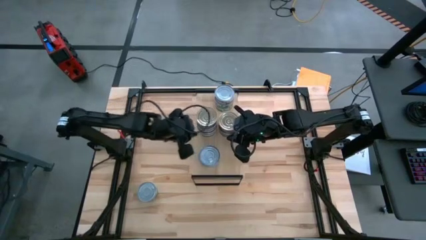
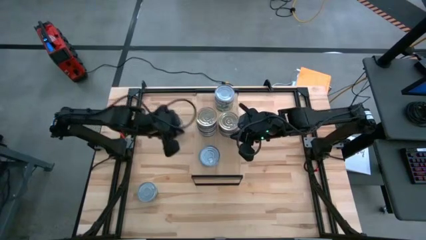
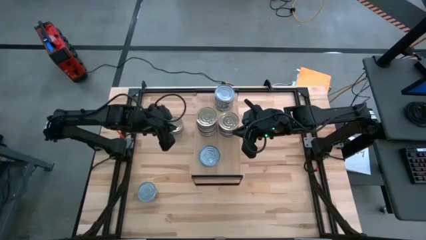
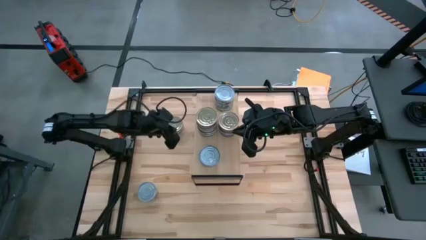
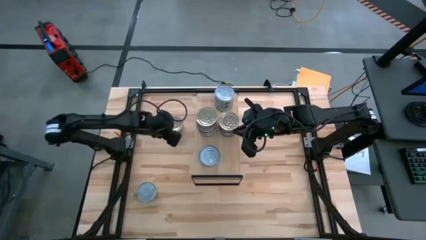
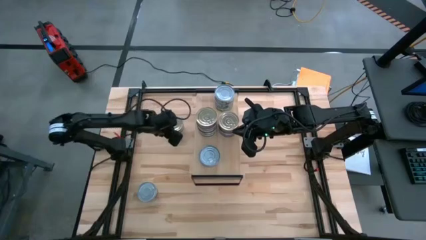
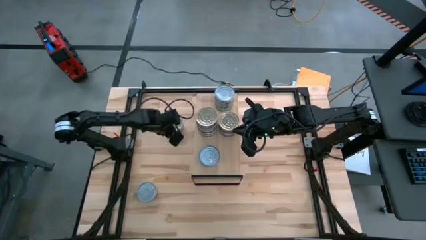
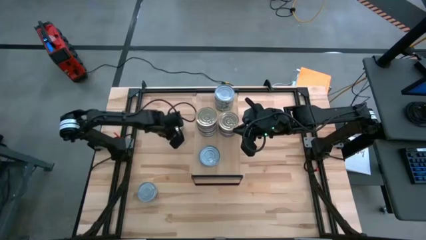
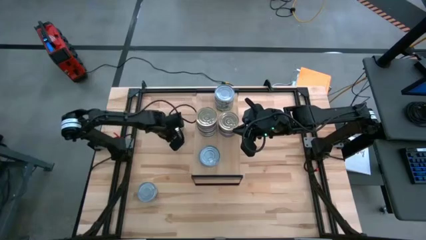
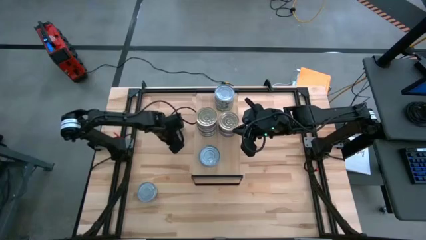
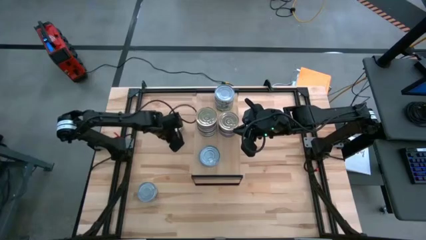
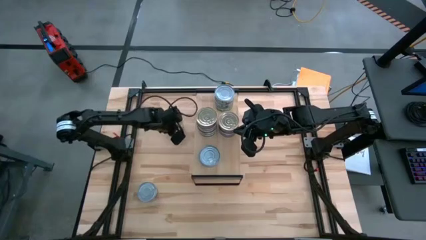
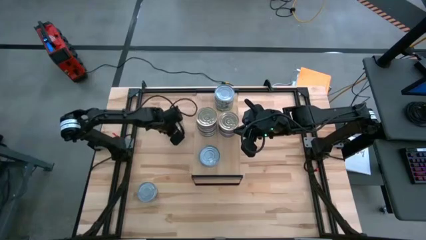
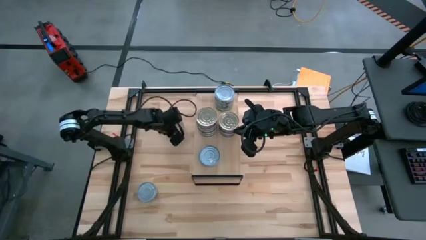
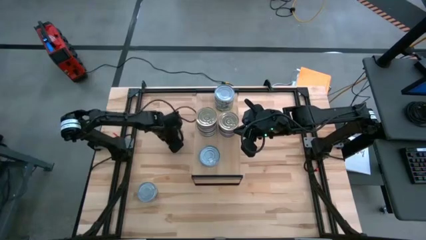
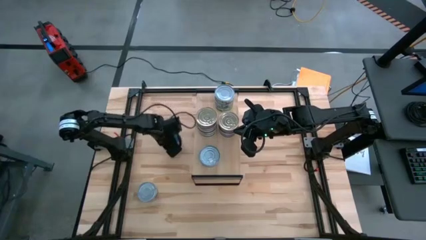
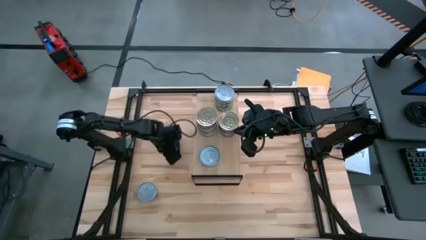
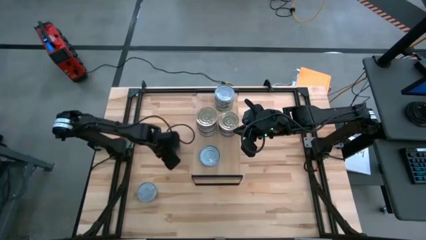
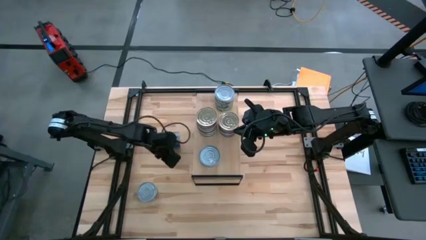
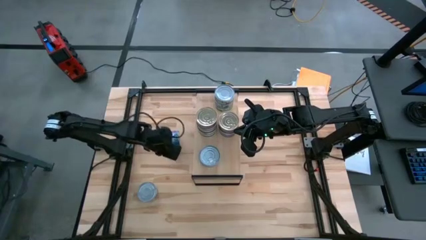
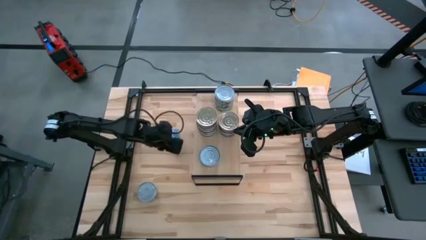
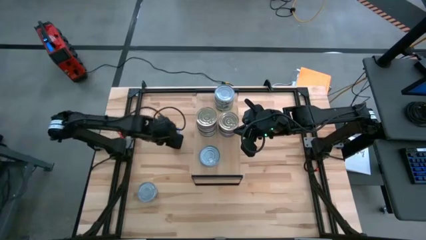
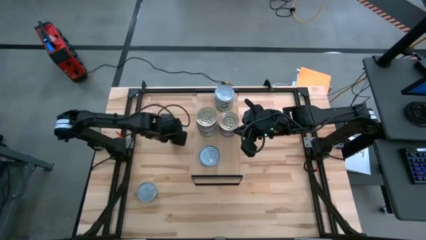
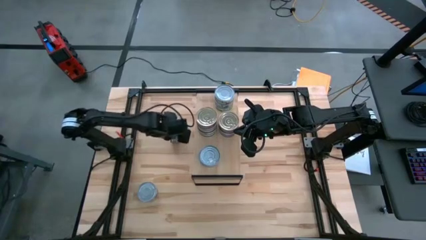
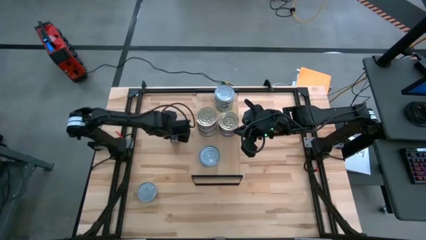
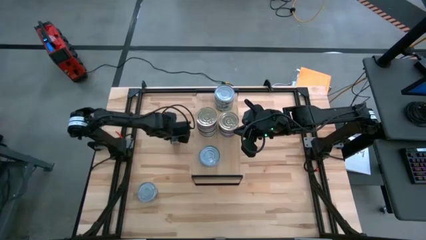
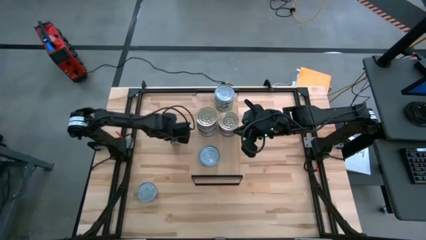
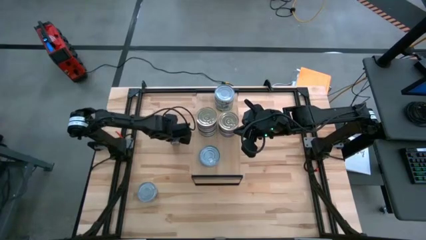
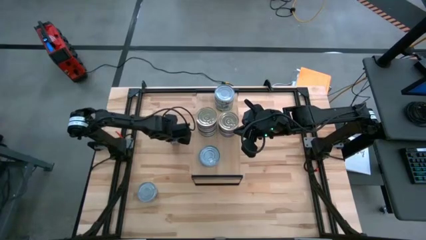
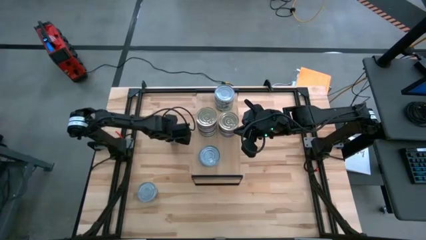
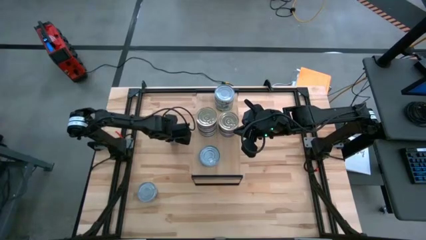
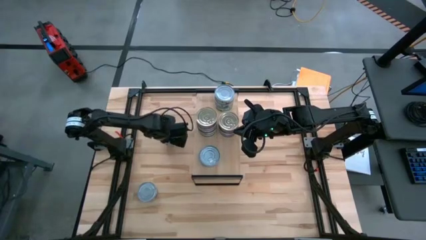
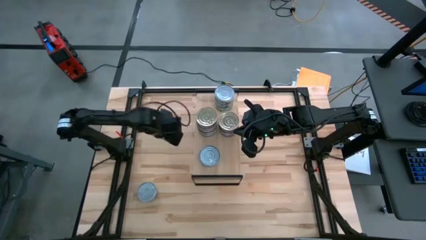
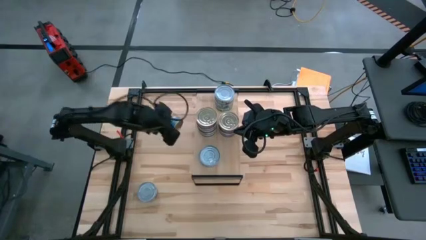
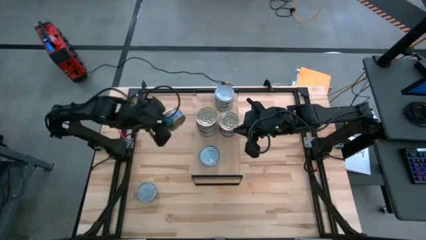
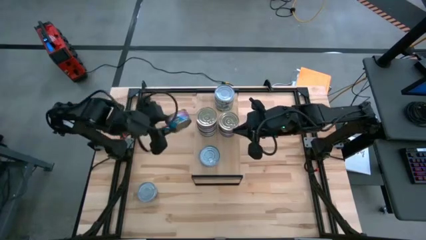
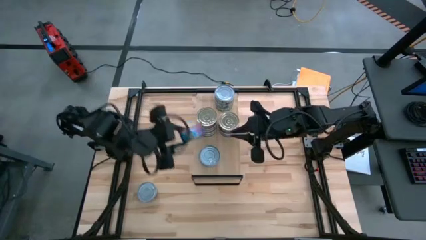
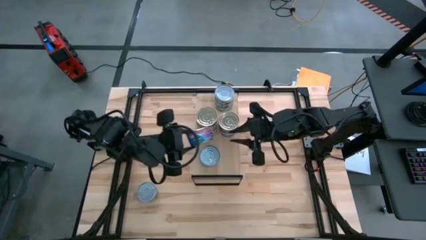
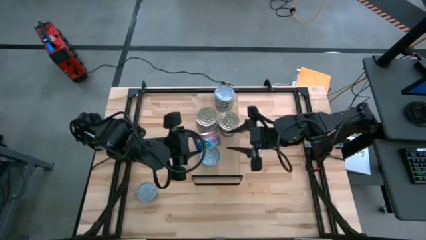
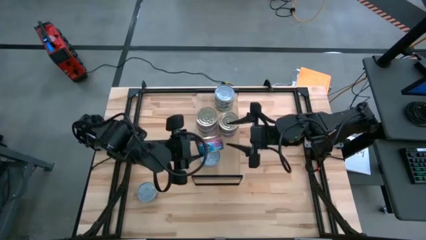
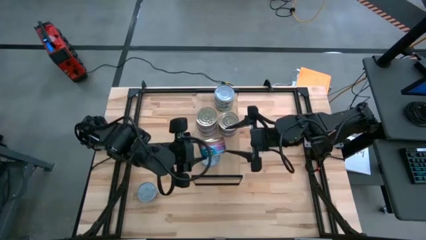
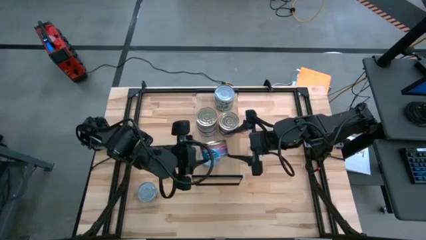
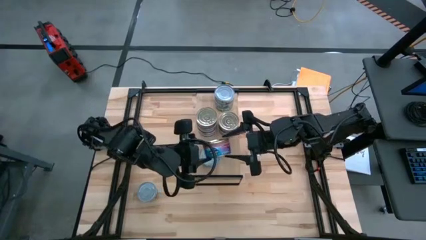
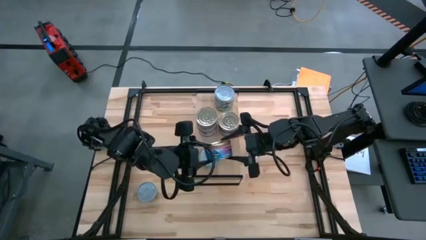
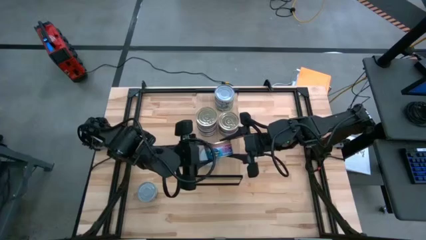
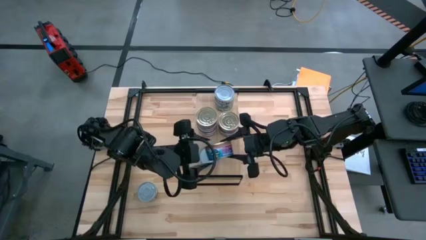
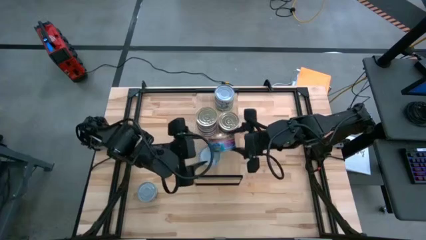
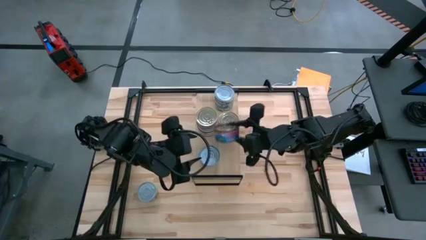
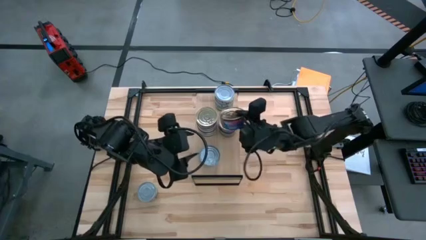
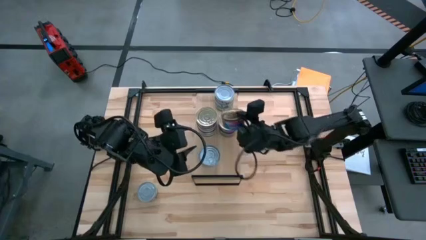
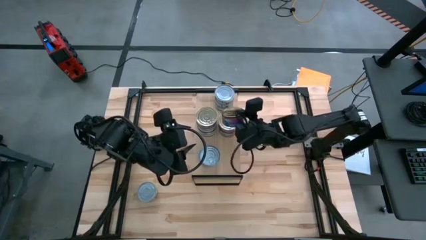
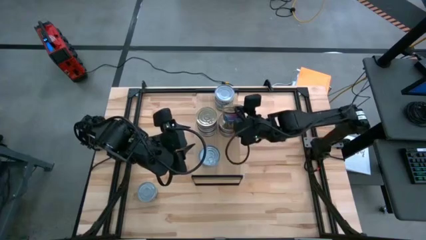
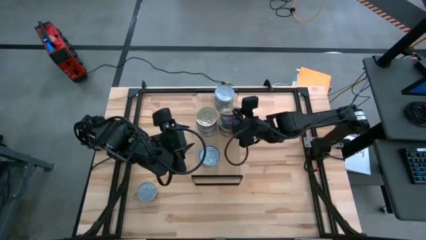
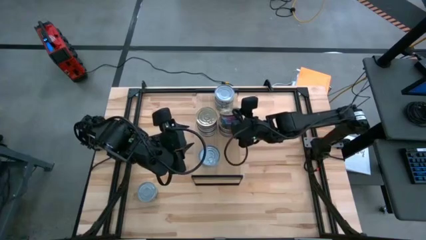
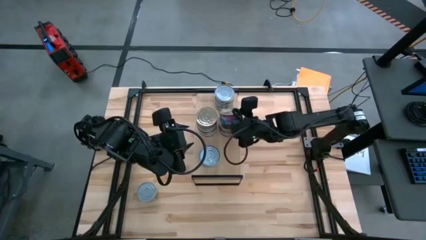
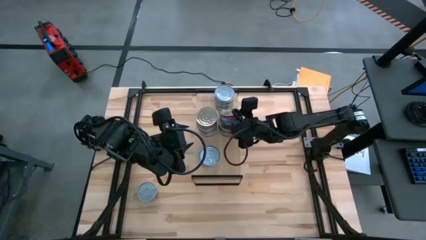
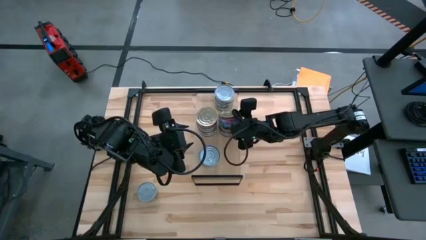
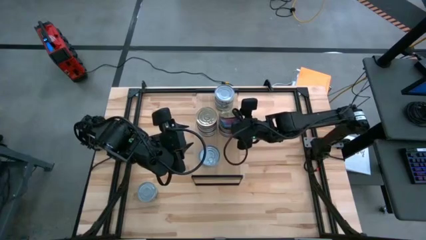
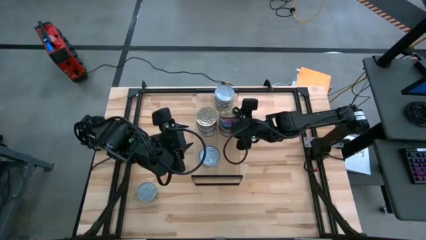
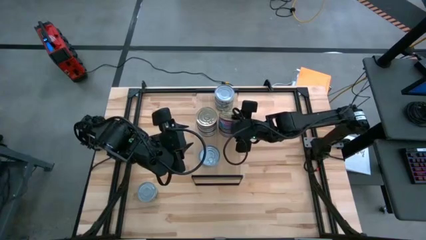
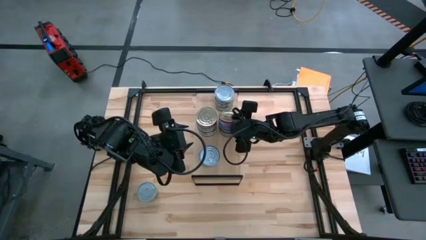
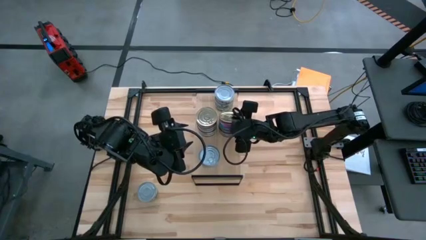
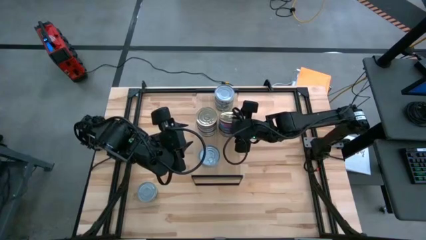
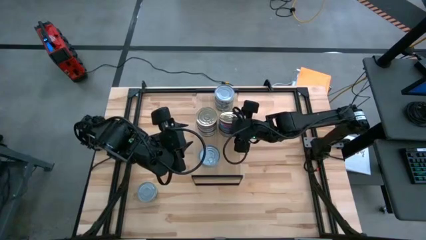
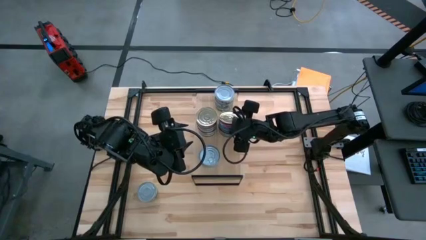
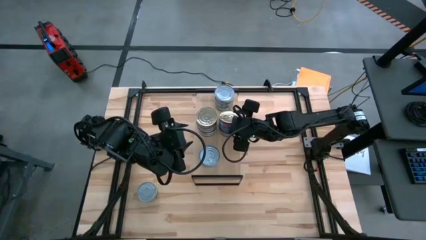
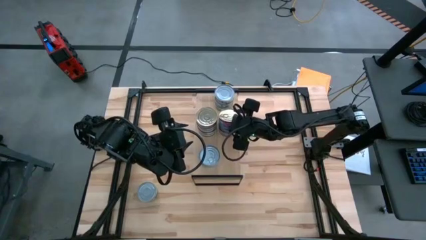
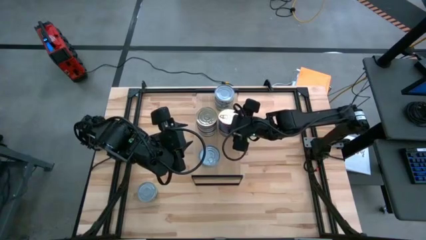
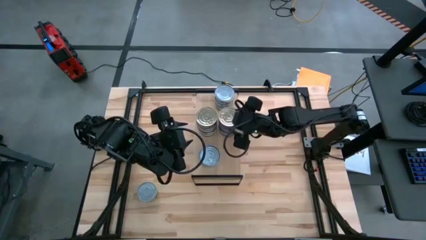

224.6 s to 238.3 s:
Task: Stack canned seafood by type on shelf
Stack the blue-pink tuna can on top of the blue-pink tuna can on the shelf aligned with the other blue-pink tuna can
